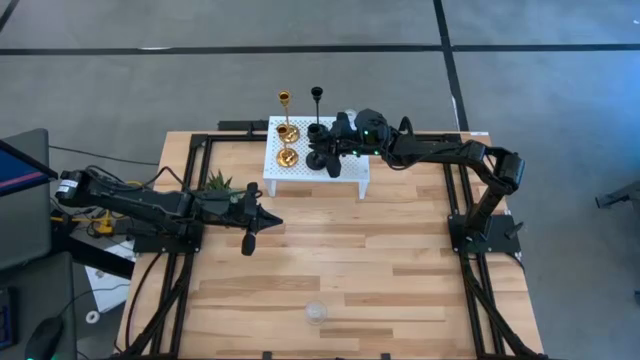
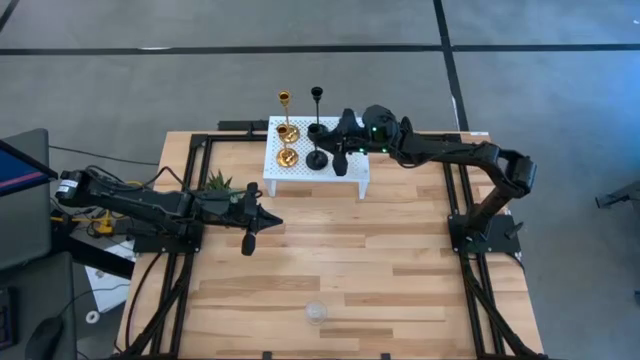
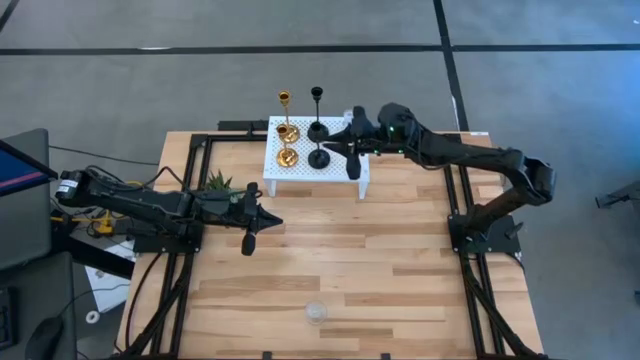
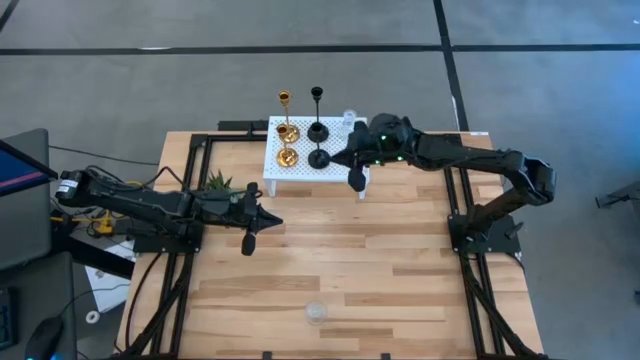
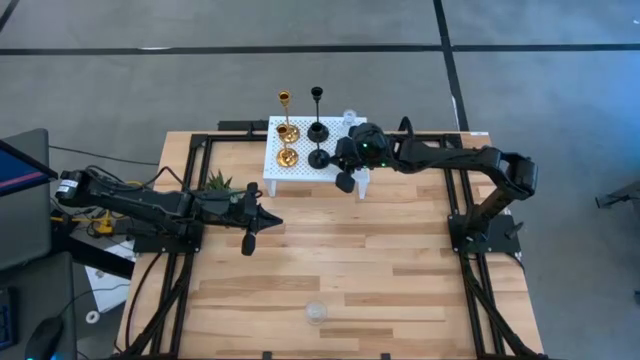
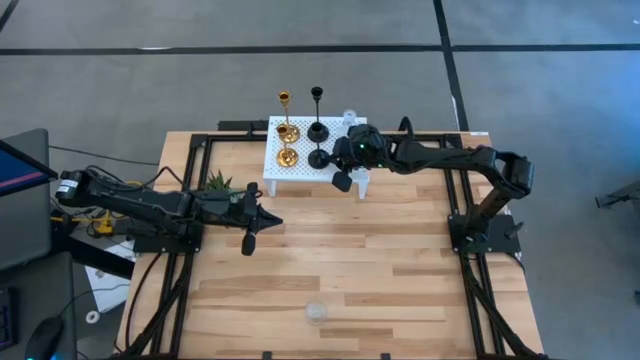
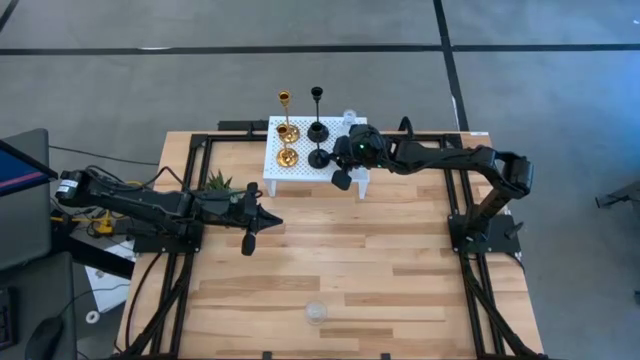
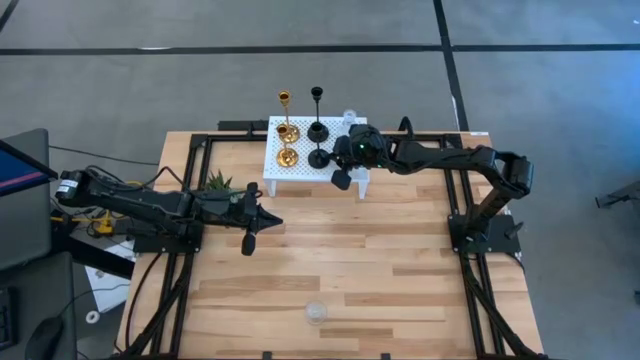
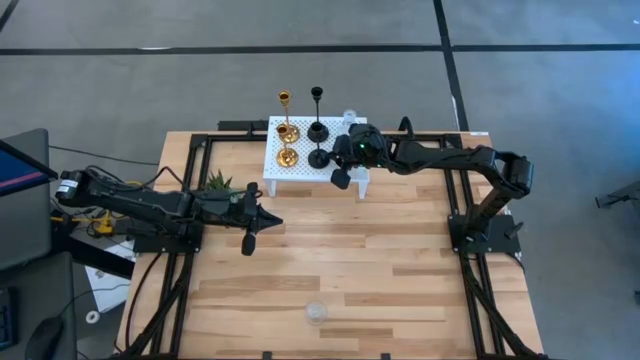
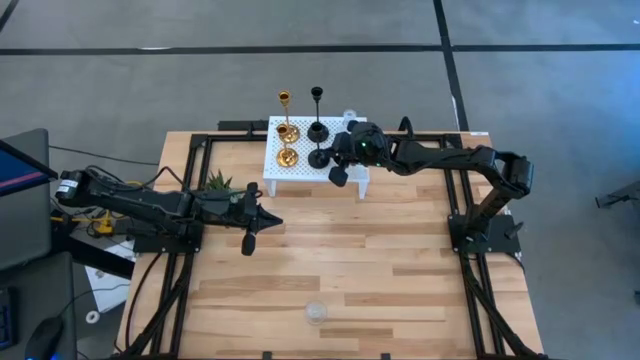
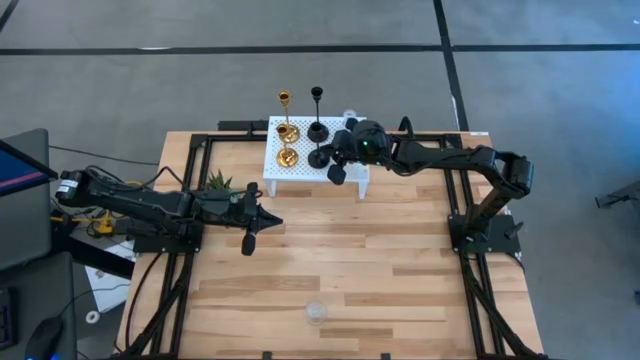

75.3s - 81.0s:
Task: Pick & Place candle stick holders
Adjust the bottom black metal candle stand on the shelf

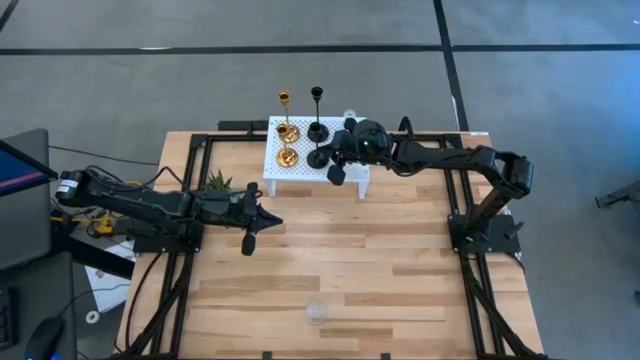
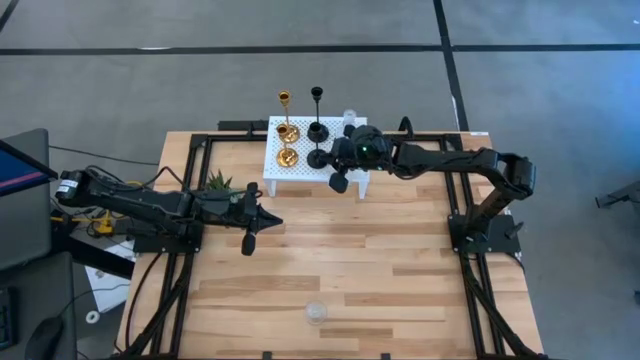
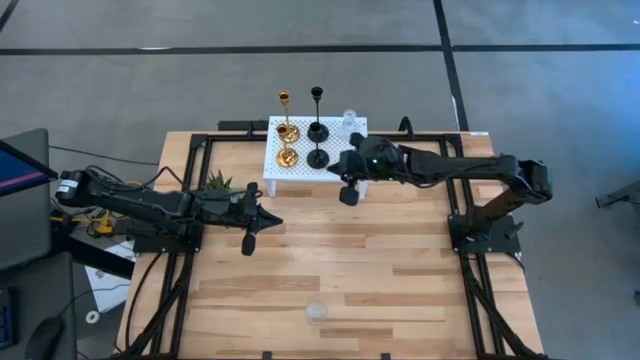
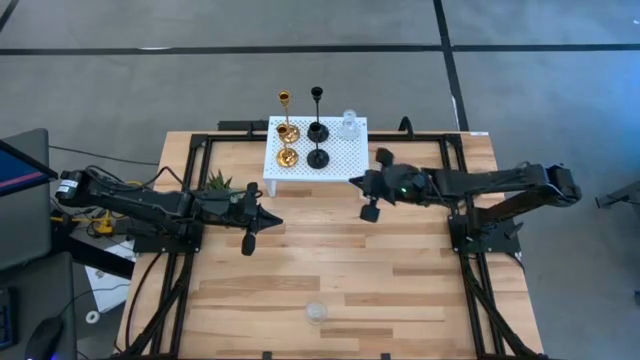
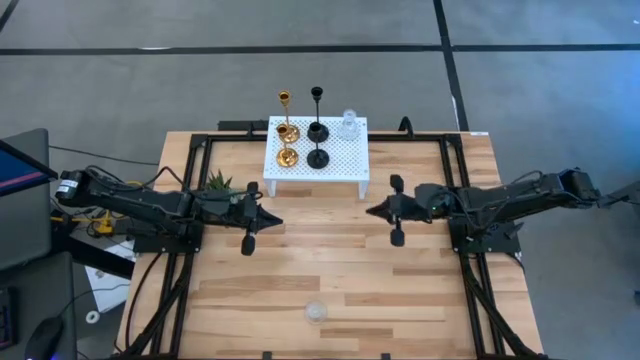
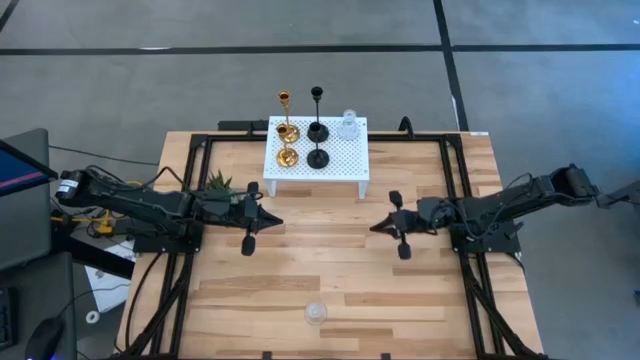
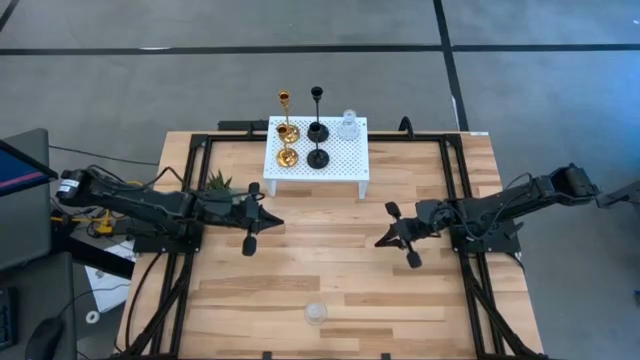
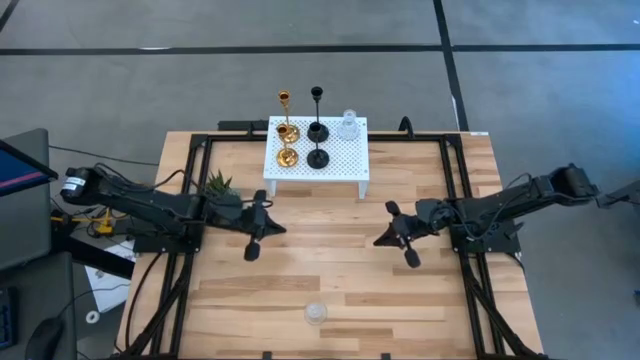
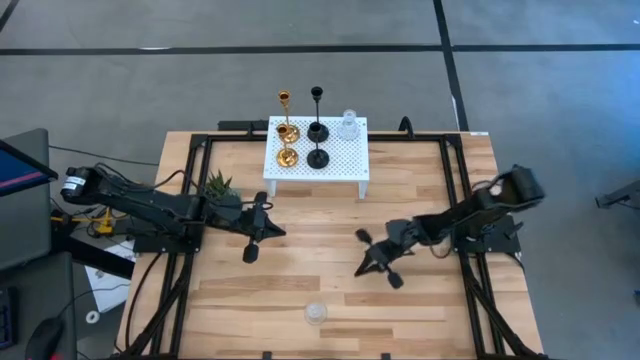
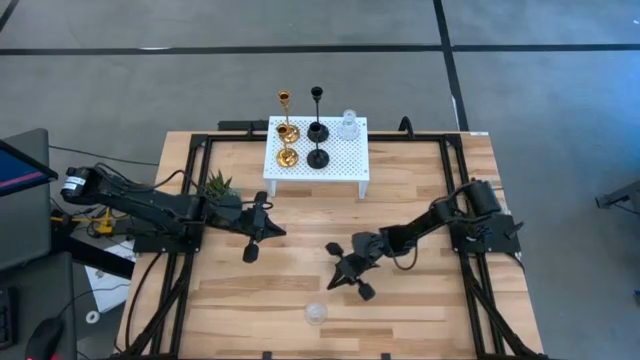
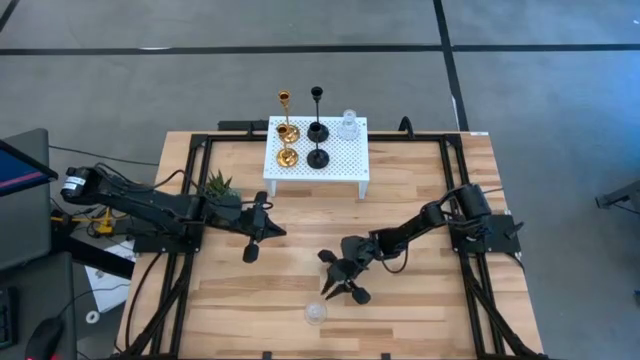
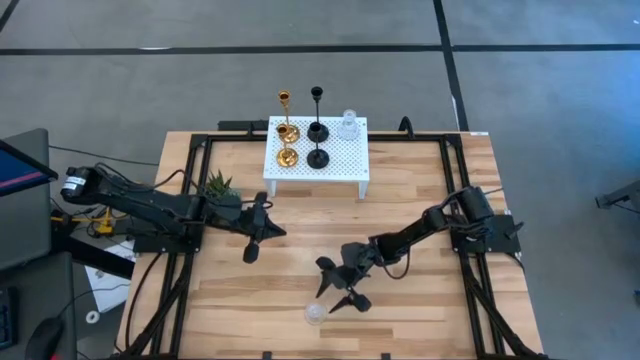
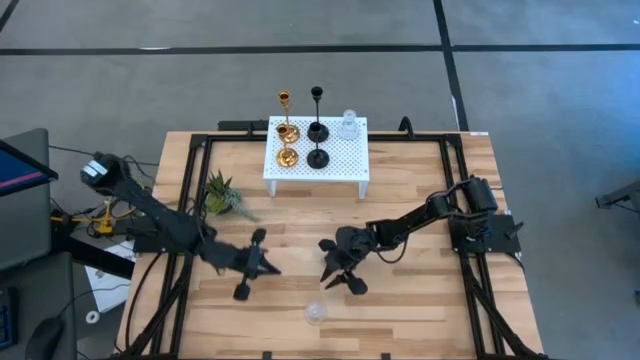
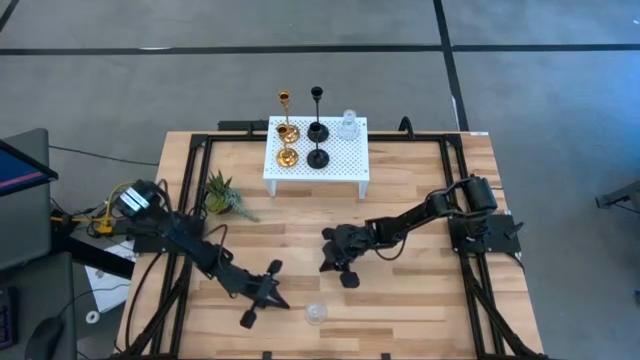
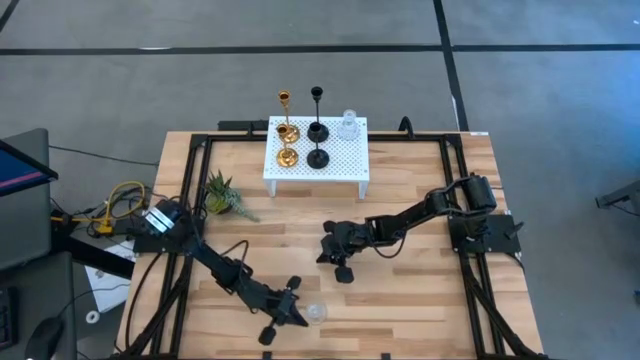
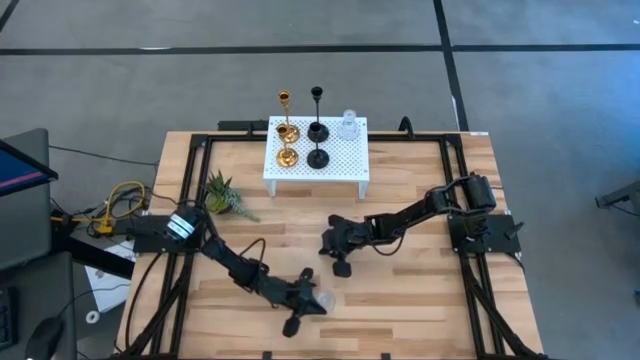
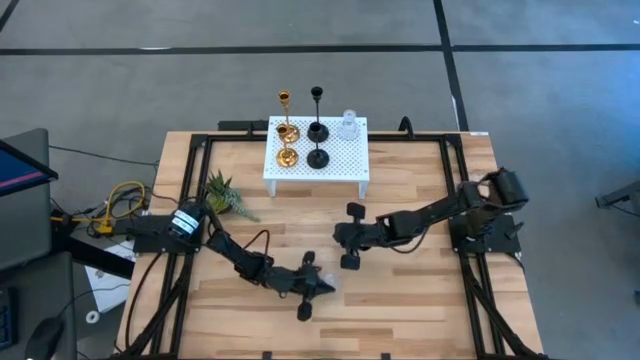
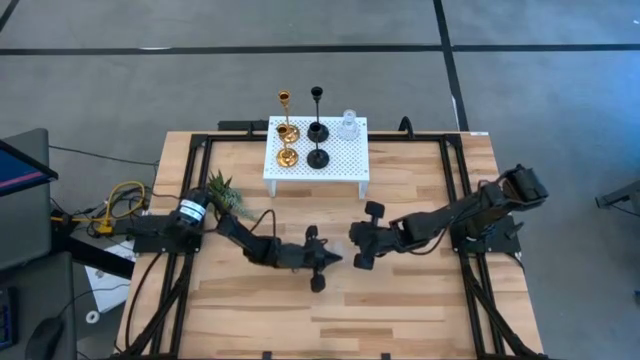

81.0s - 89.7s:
Move the transparent glass candle holder to the middle of the table

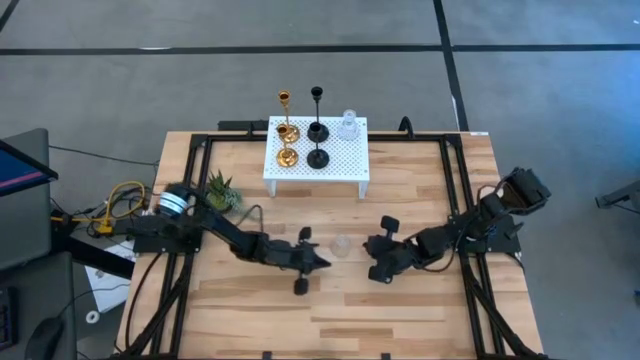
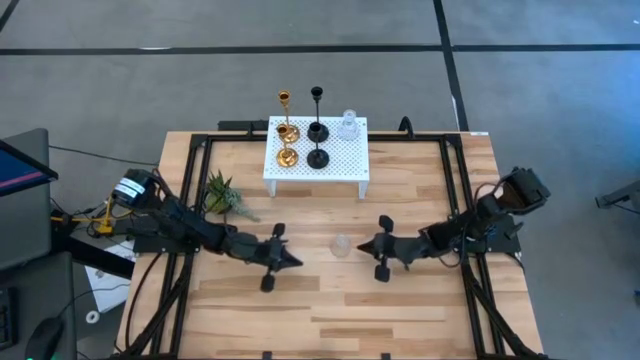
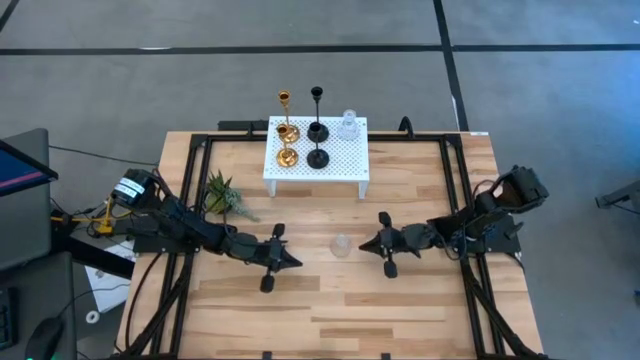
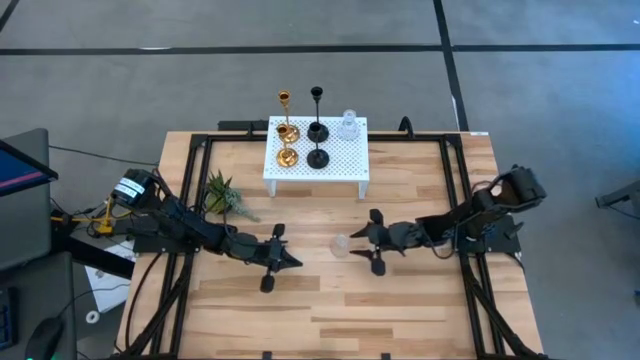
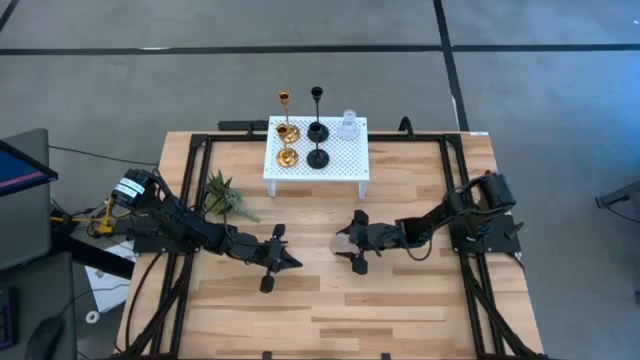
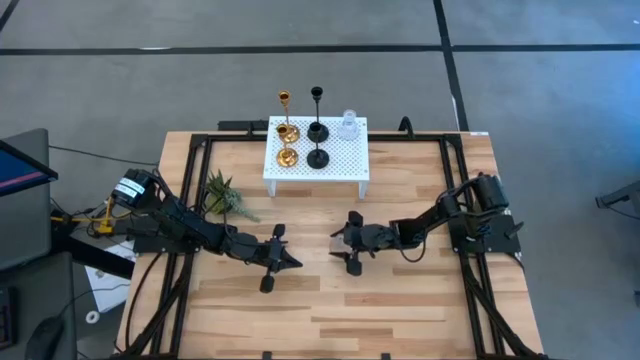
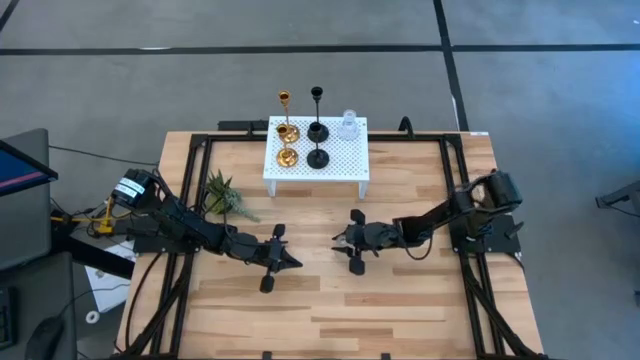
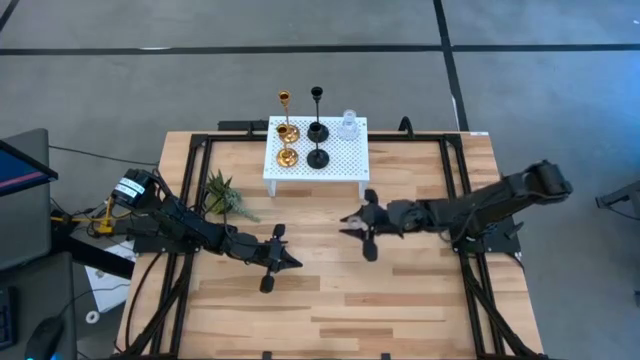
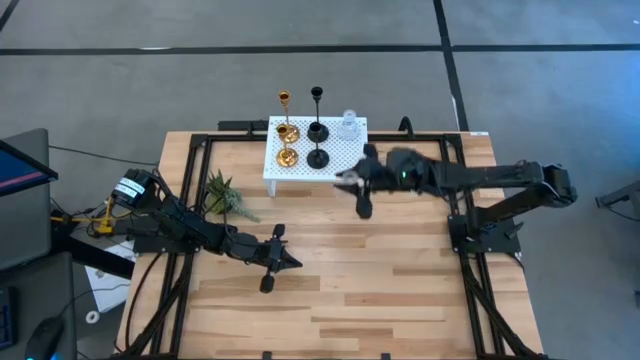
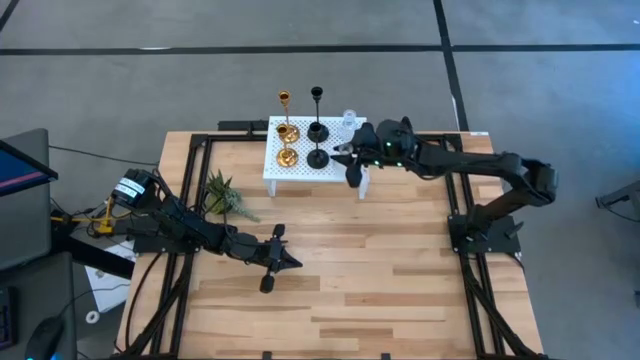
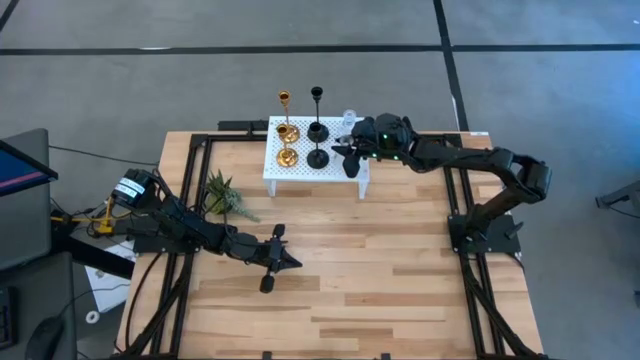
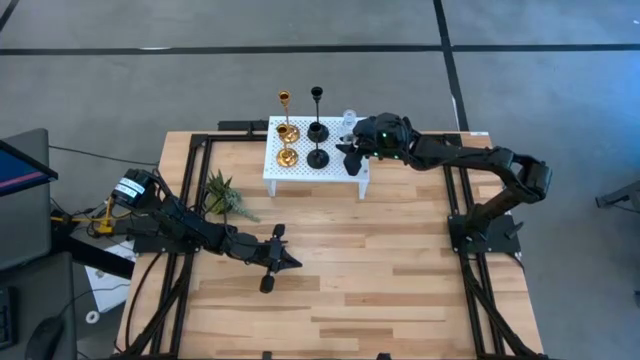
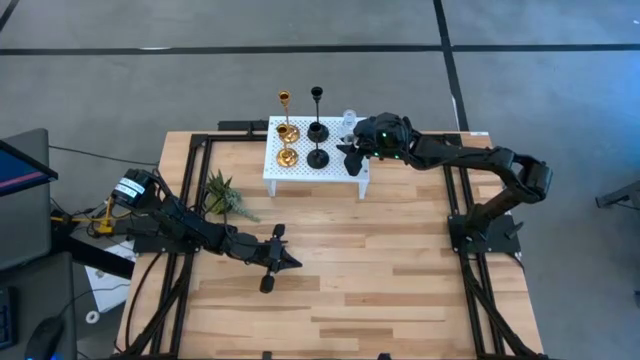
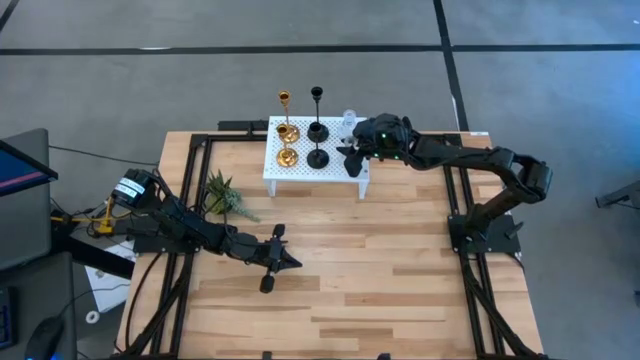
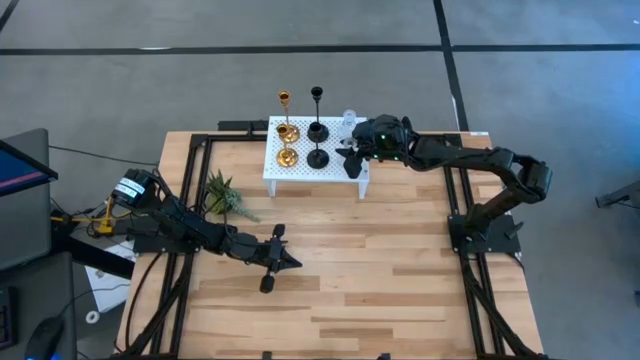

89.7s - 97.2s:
Put the transparent glass candle holder on the shelf
